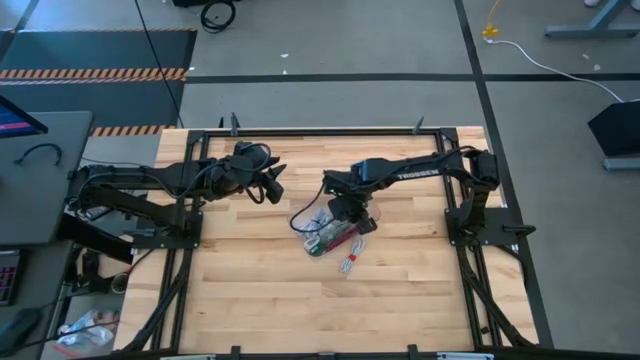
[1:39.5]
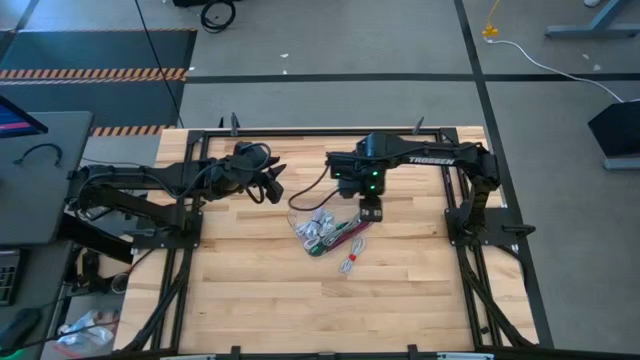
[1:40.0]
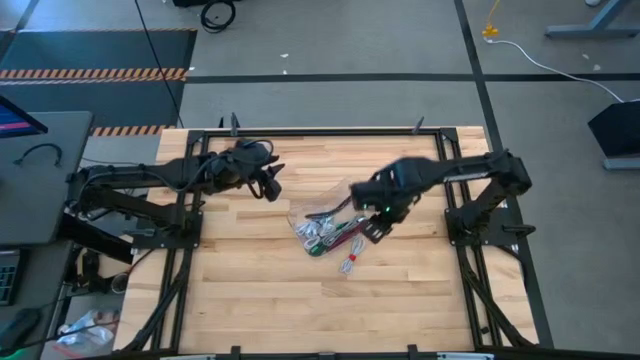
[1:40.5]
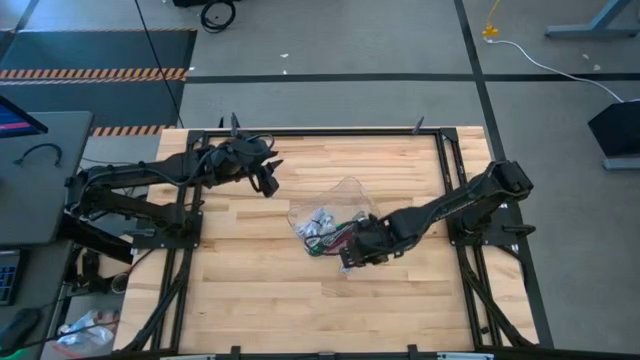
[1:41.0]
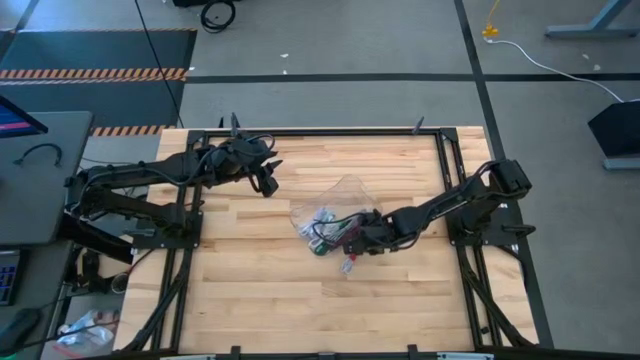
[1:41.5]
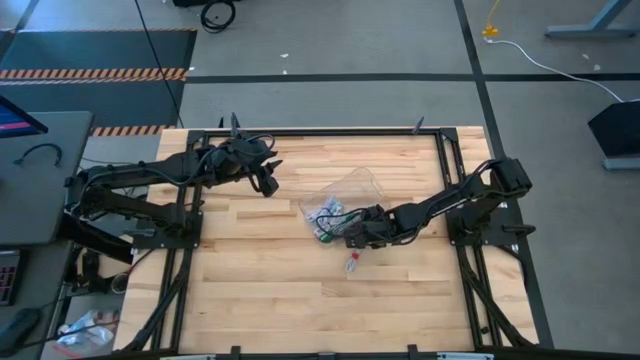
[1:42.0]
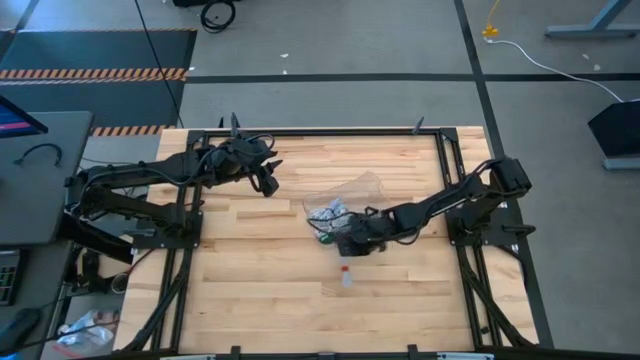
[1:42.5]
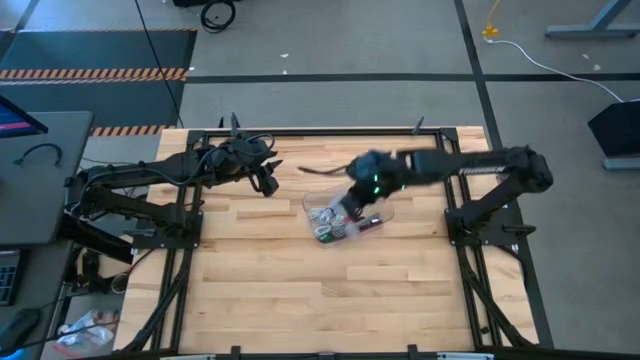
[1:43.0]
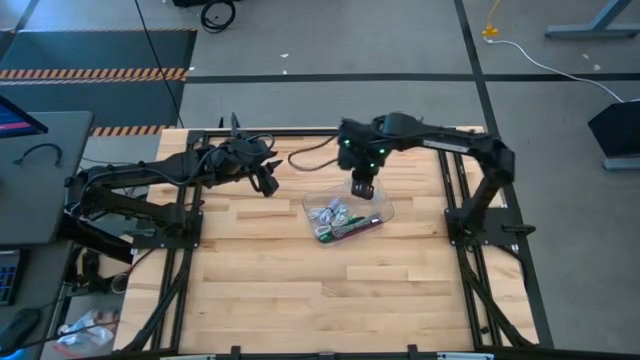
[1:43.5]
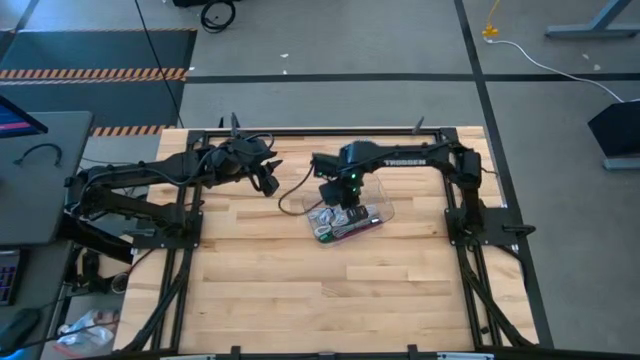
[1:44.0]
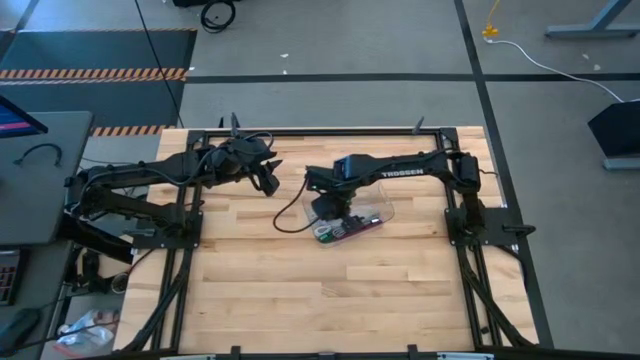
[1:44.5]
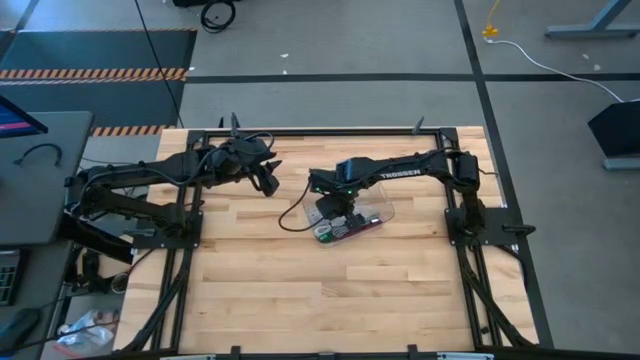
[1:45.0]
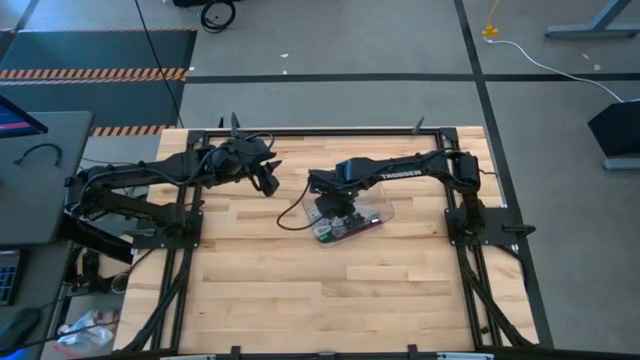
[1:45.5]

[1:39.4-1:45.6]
Task: Pick and place USB-C Cables
Put the white charger cable into the transparent bin

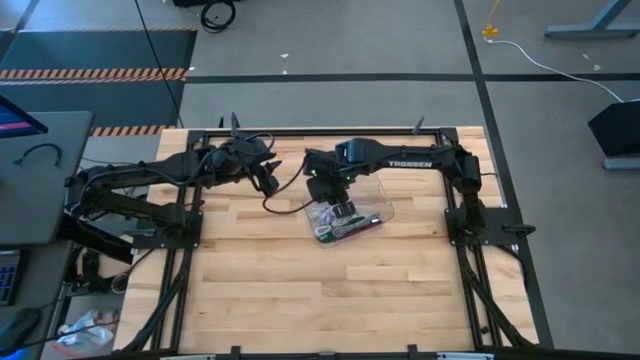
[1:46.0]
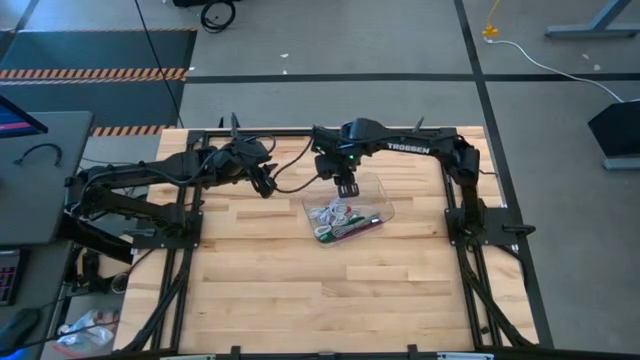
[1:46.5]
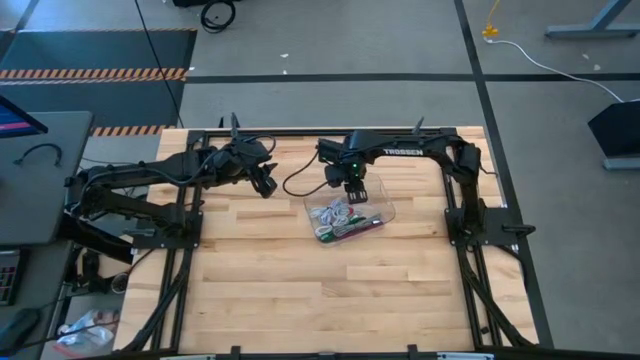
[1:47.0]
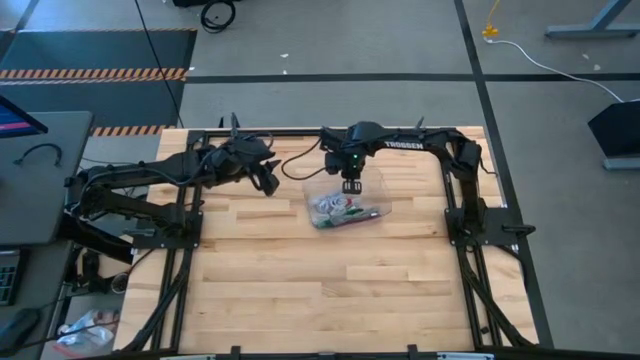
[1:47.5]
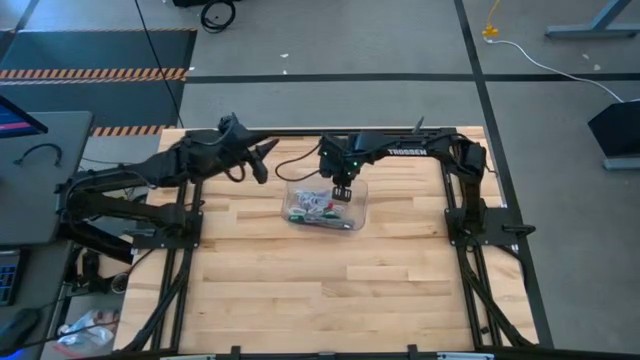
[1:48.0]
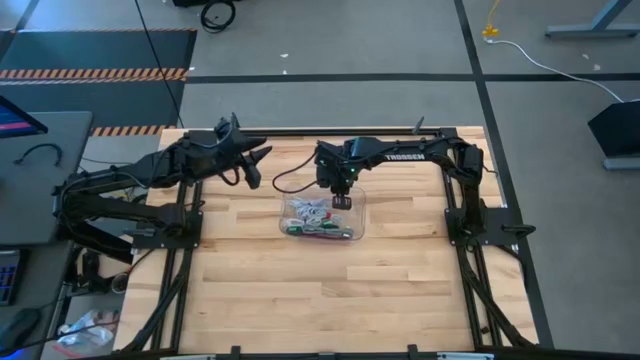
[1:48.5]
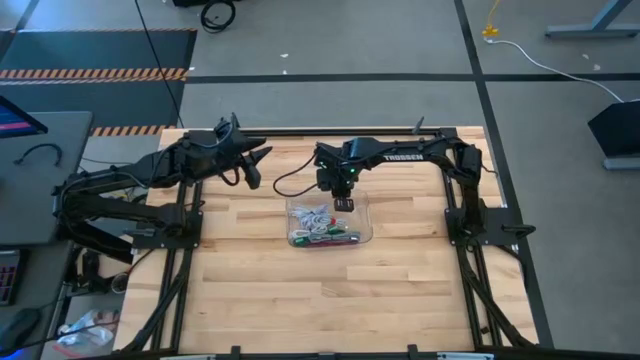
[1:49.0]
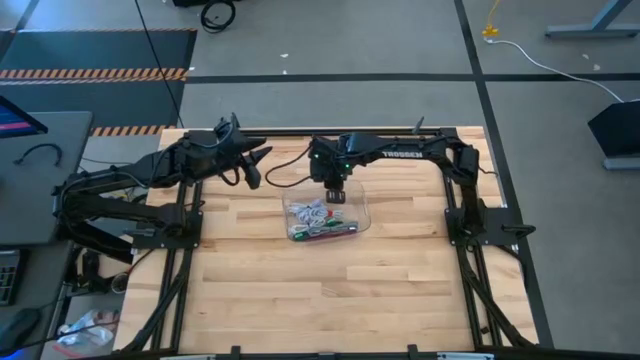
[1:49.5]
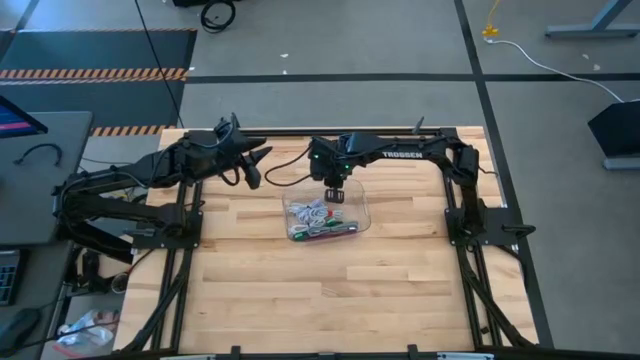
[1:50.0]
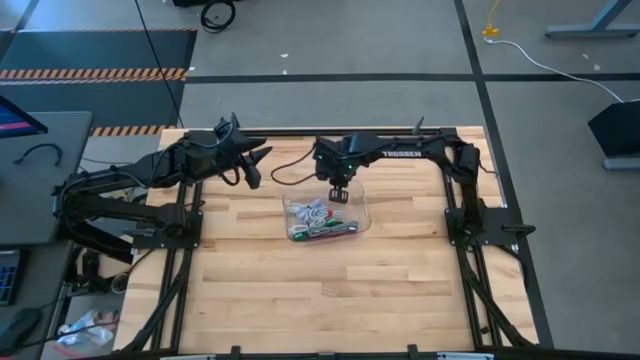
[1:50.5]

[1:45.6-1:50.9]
Adjust the transparent bin on the table

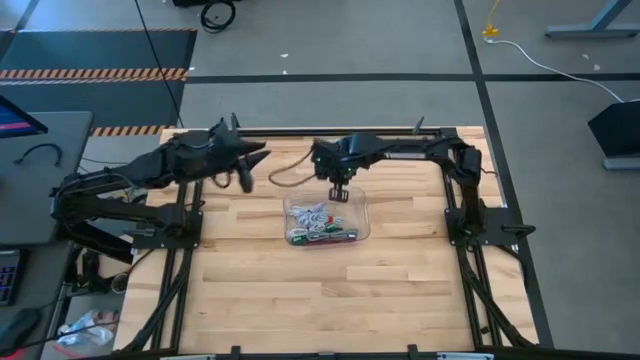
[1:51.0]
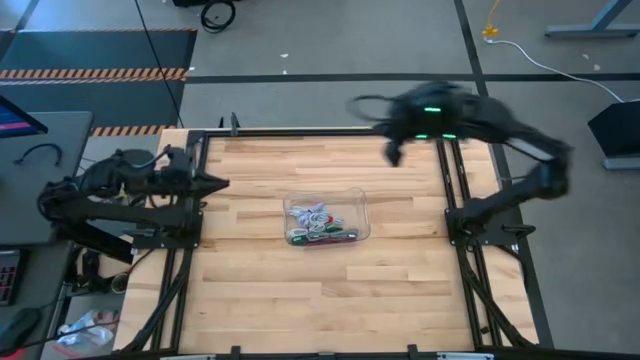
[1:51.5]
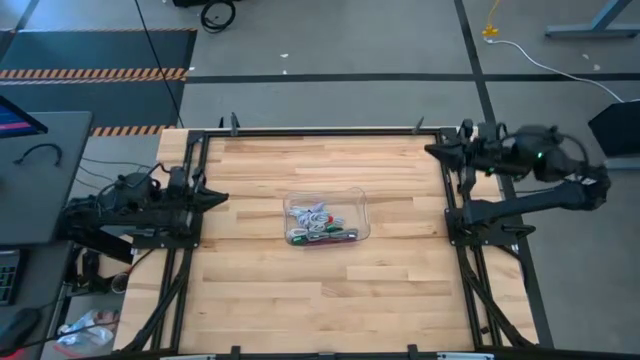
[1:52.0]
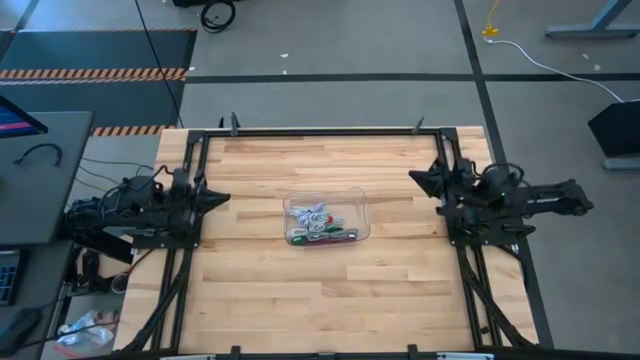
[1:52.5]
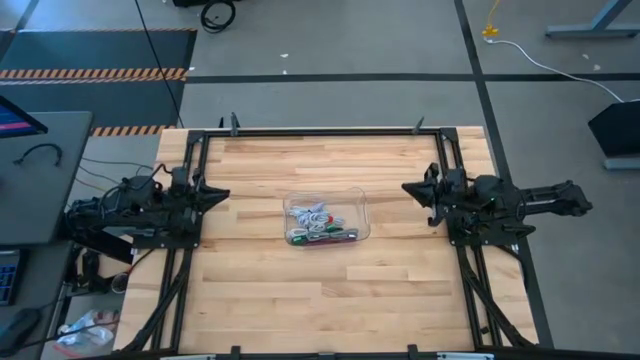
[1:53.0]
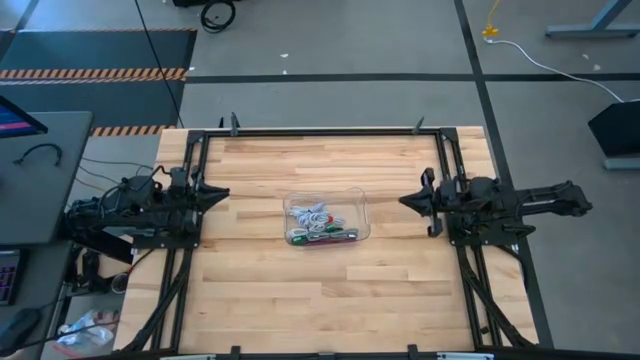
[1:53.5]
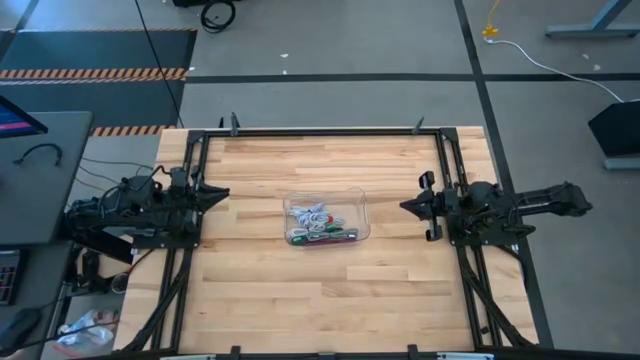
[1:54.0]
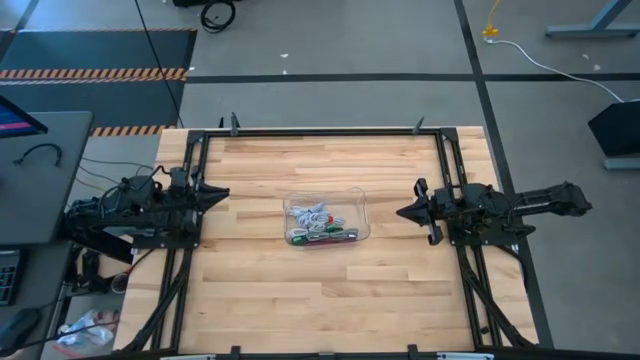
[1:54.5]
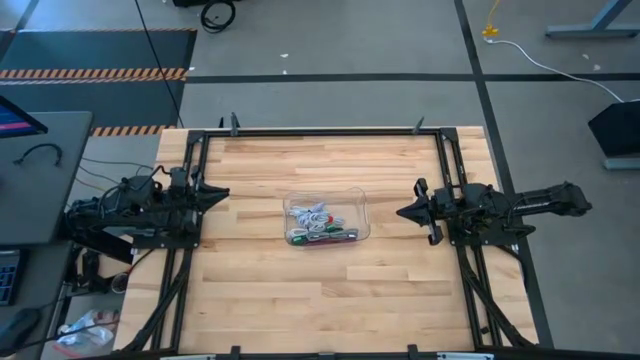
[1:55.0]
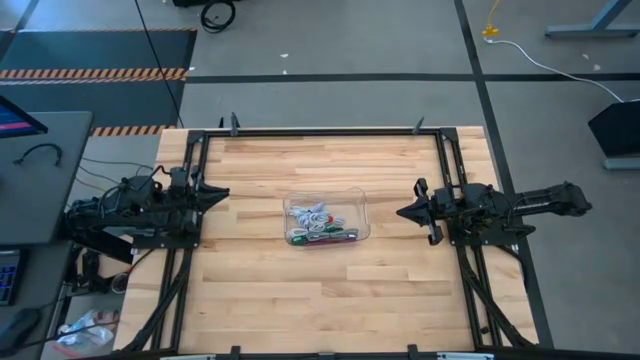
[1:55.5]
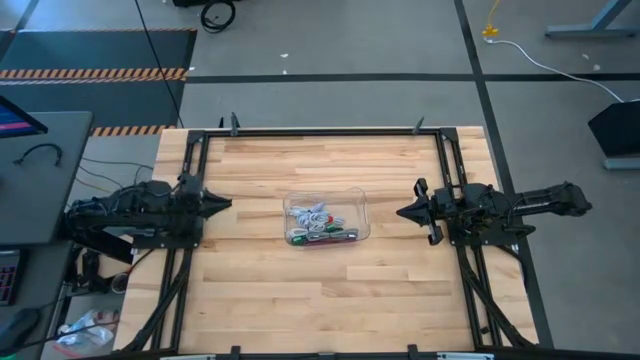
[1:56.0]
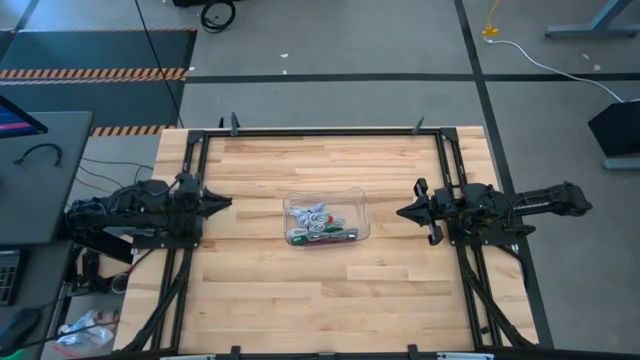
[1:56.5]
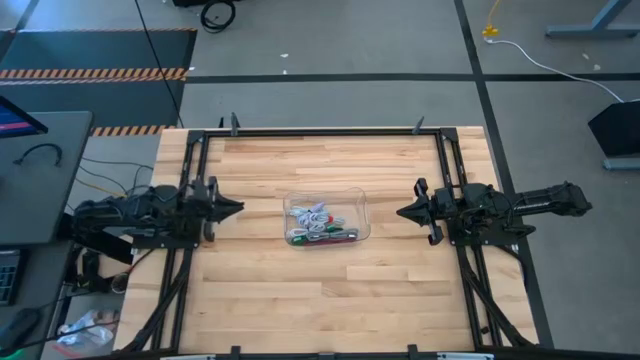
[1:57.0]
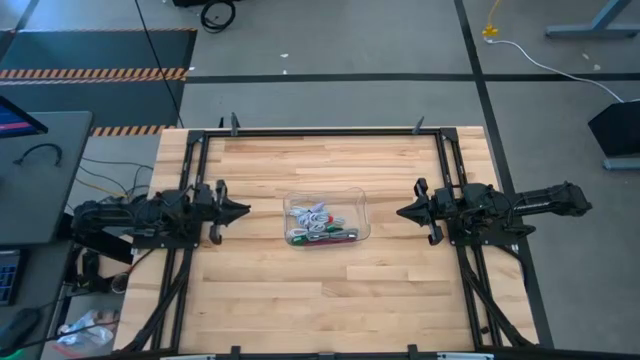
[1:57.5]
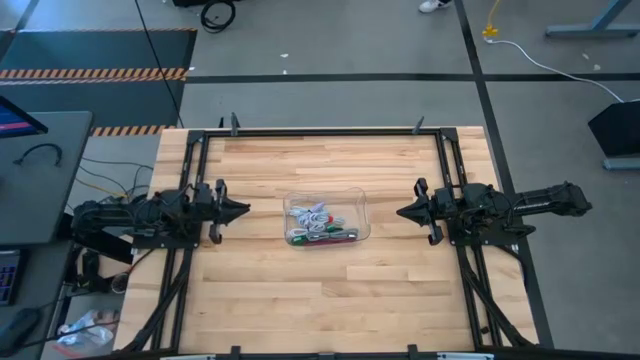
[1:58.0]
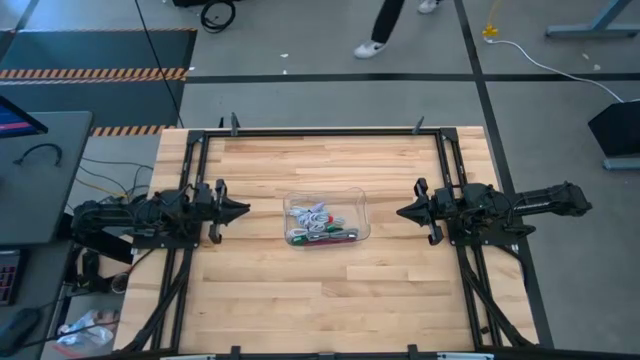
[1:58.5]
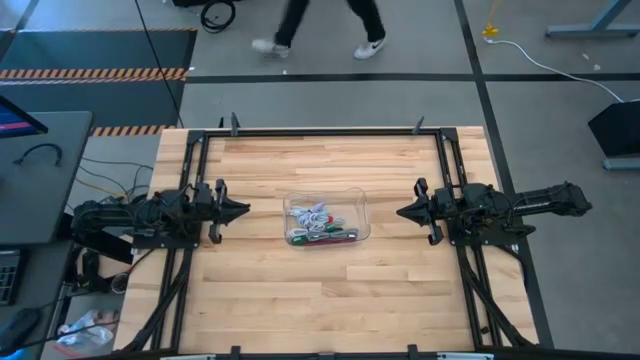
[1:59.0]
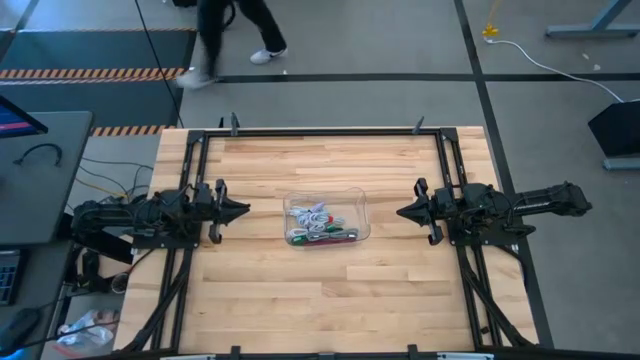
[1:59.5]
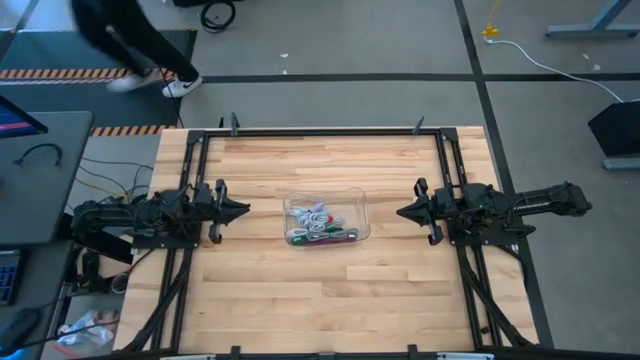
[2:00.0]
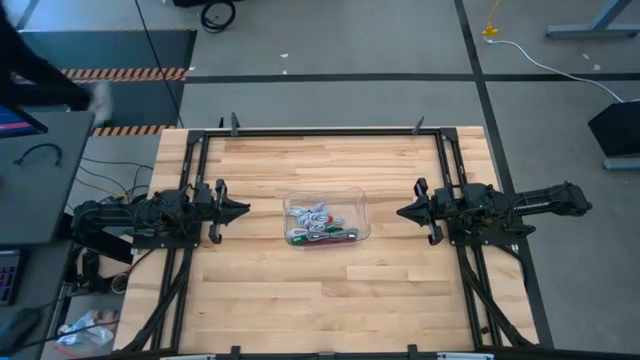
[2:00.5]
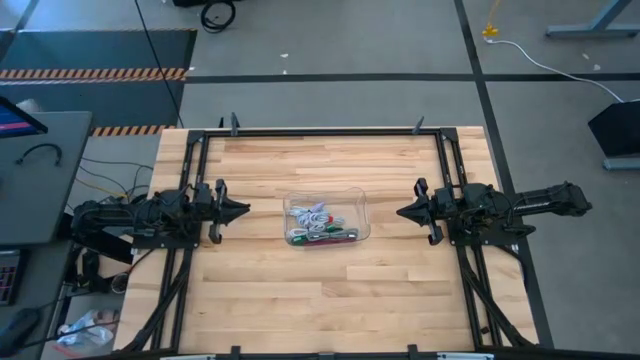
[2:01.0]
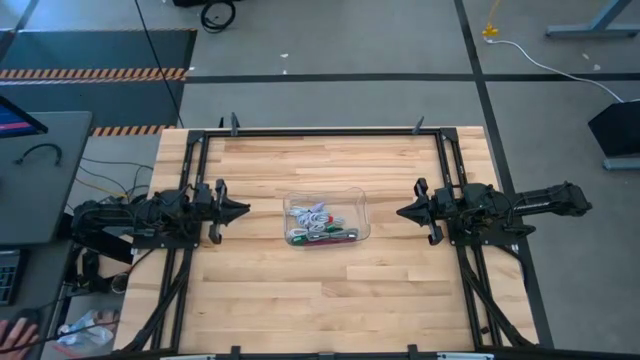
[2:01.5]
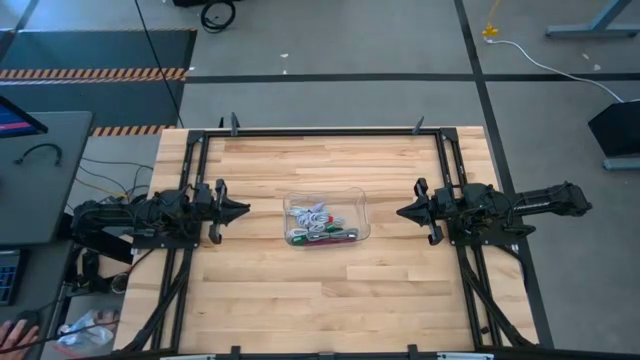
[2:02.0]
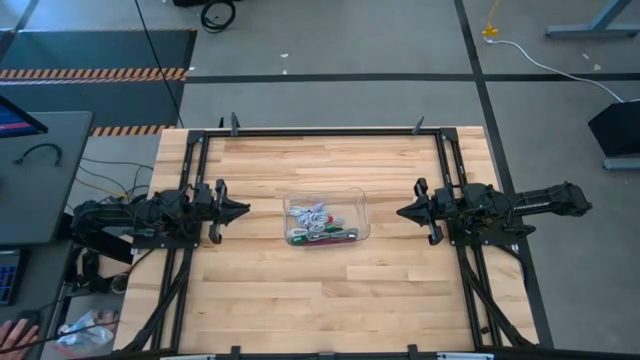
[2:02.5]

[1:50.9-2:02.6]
Return to Home Position
